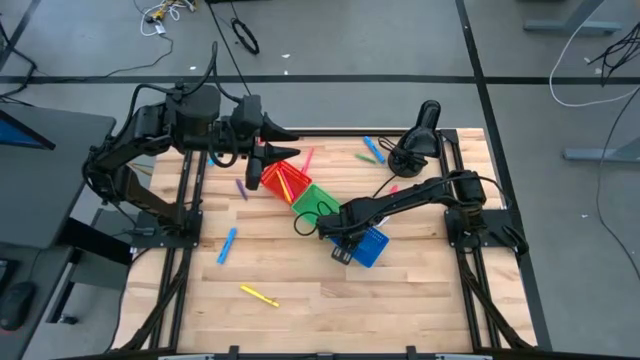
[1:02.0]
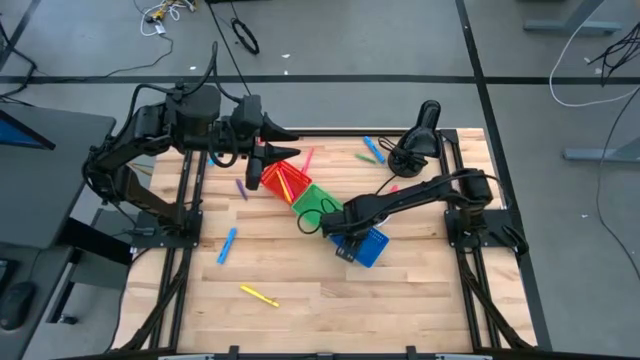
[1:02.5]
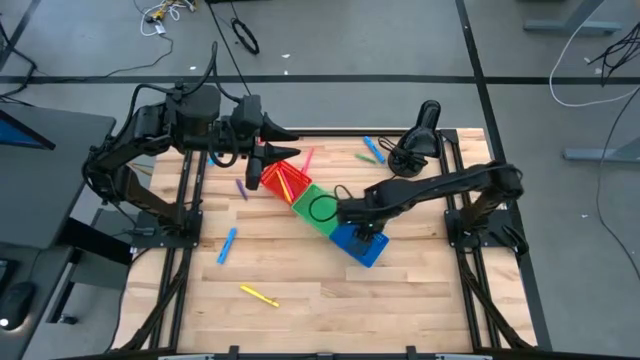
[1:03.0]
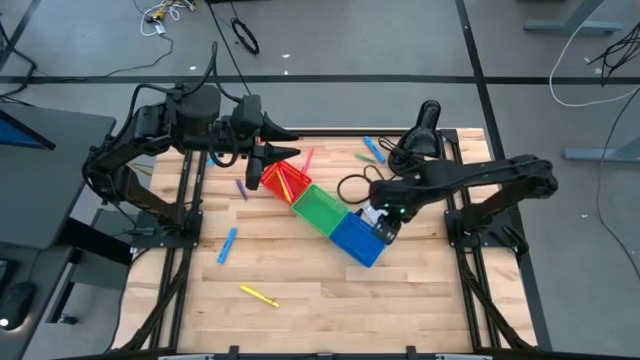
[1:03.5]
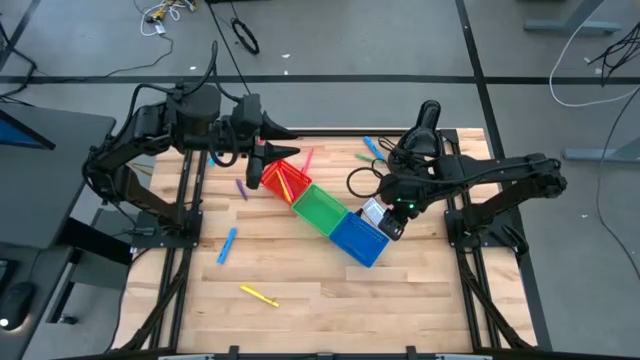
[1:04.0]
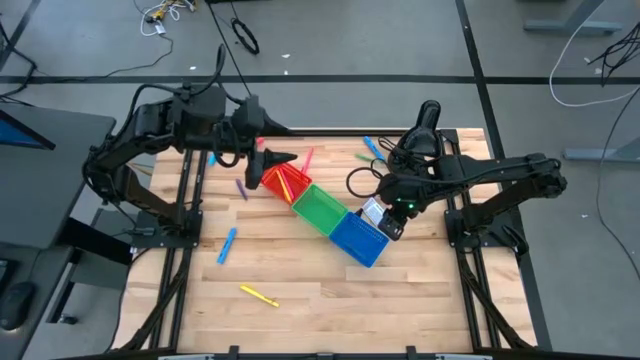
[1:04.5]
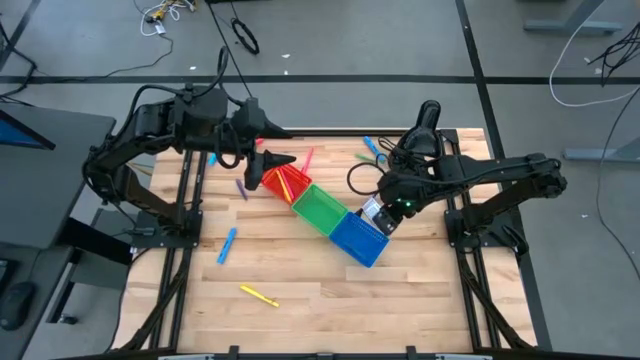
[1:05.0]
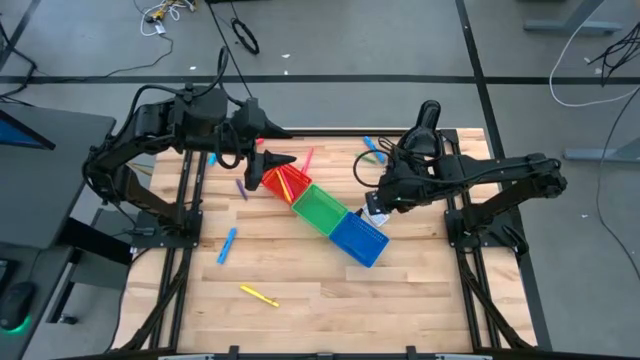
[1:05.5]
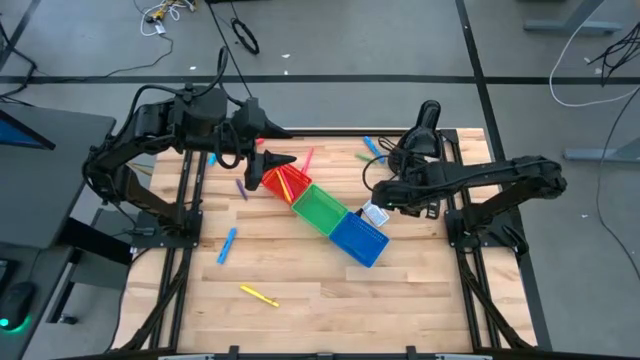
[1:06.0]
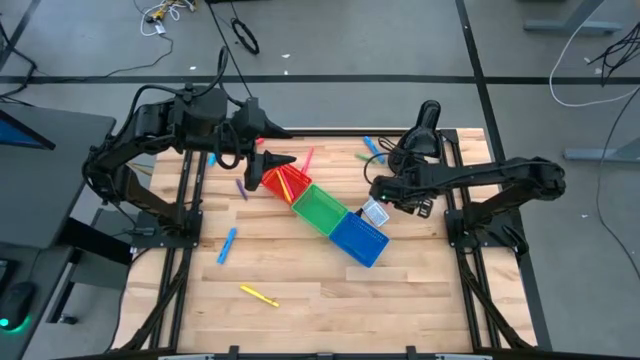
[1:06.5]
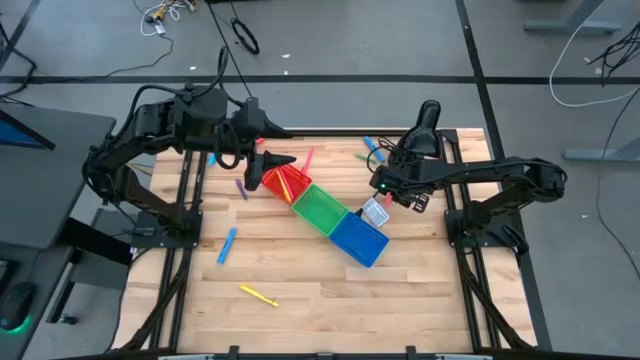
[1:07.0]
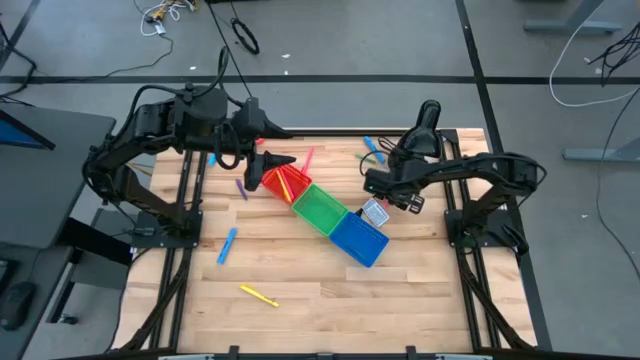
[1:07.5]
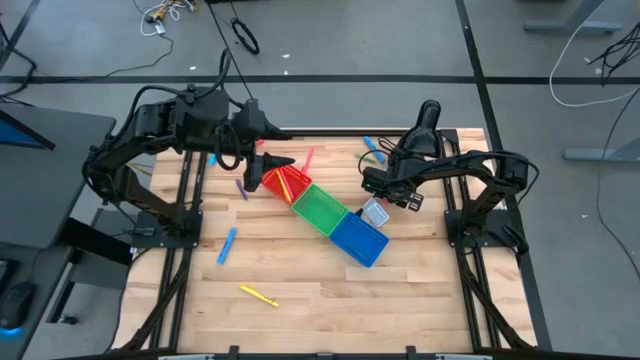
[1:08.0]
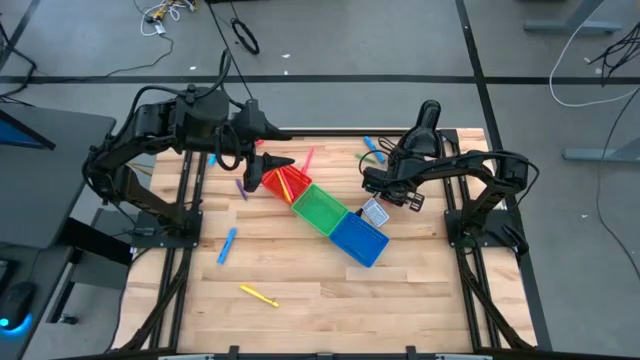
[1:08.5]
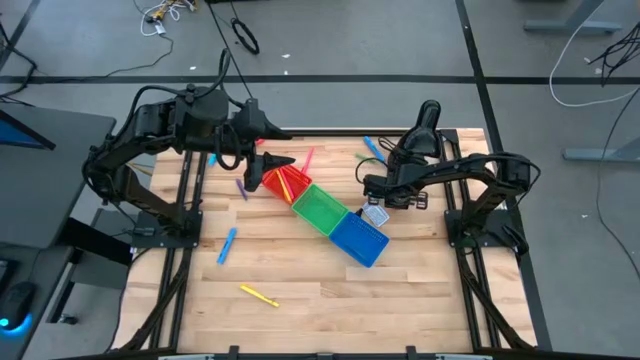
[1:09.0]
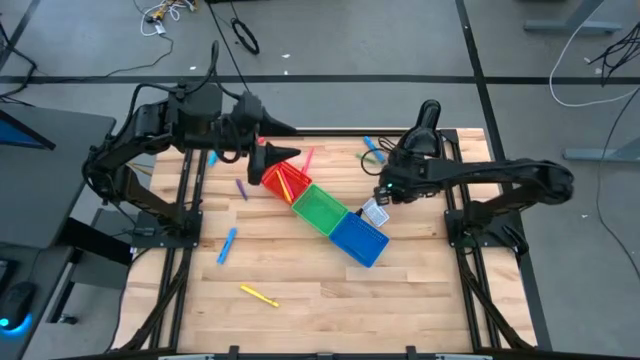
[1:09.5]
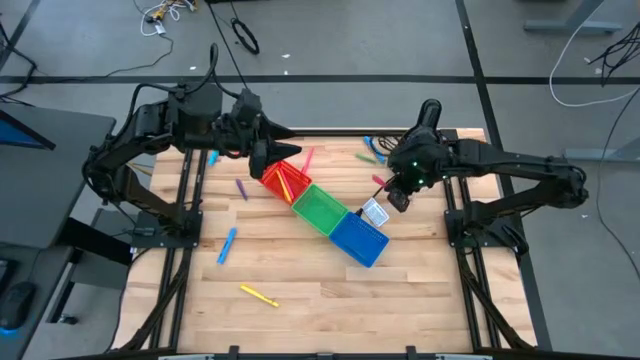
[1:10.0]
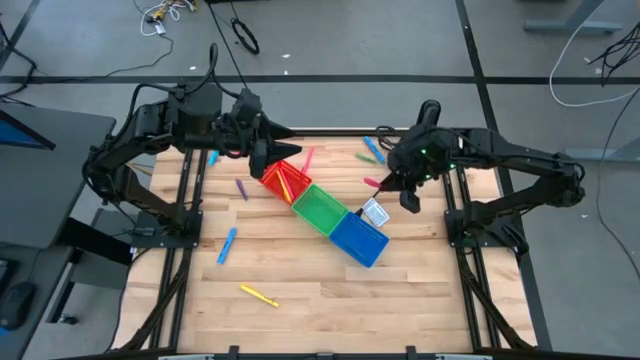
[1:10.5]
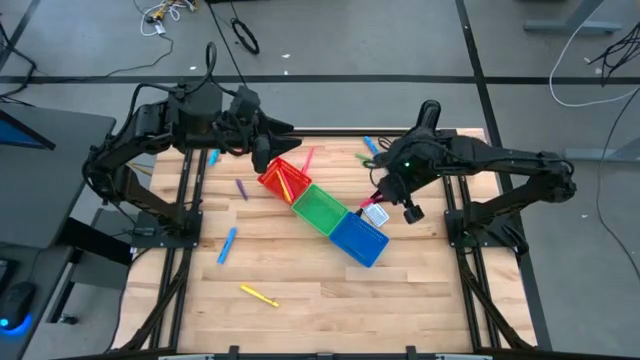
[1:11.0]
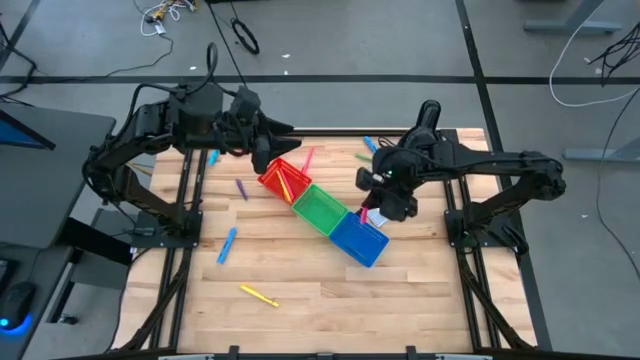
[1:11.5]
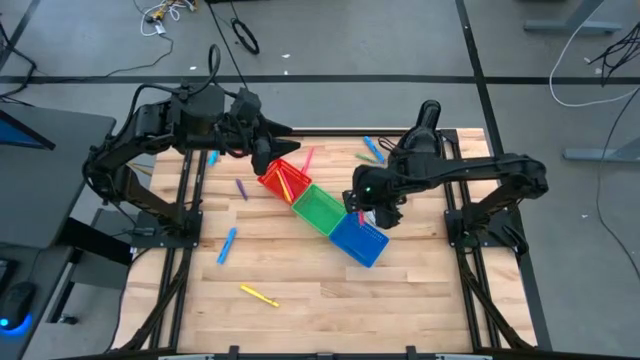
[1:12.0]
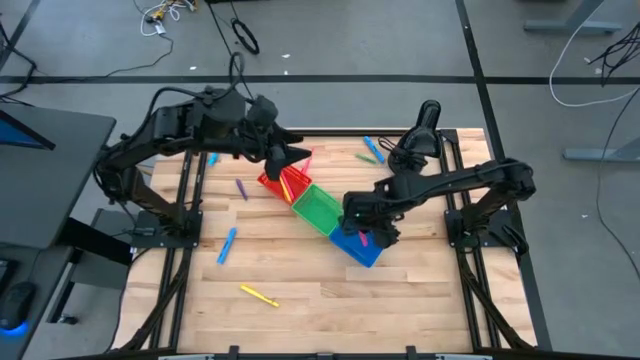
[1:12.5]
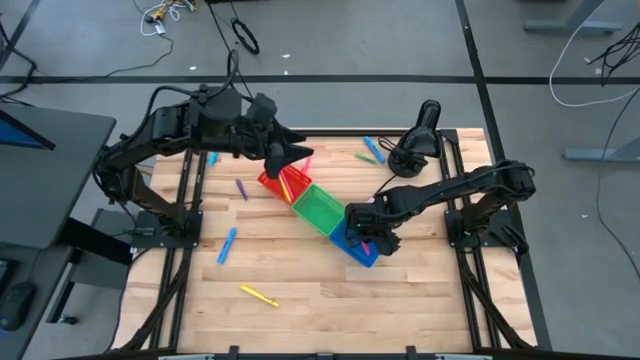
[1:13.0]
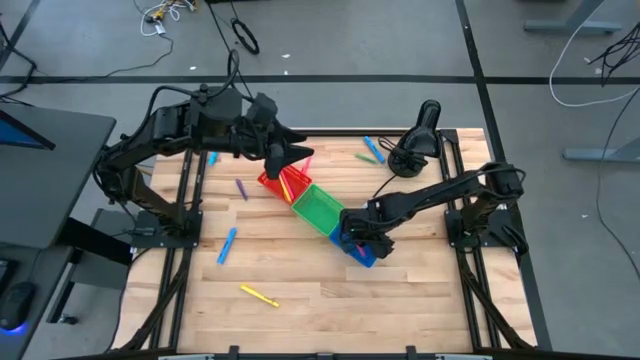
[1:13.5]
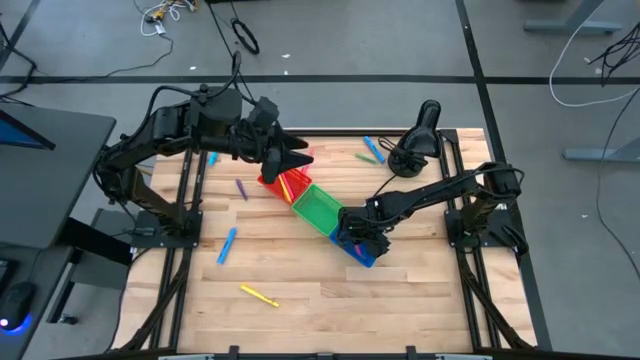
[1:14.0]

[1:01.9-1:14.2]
Task: Pick & Place Markers
Put the pink pen into the blue bin

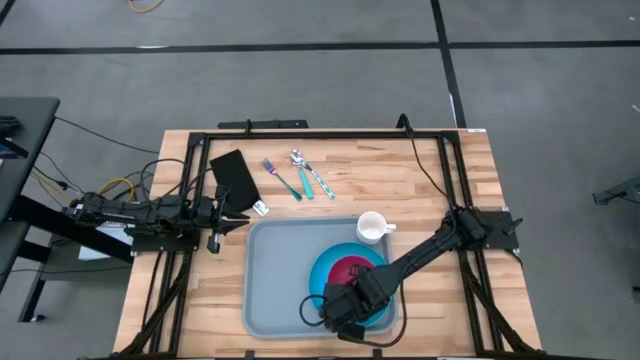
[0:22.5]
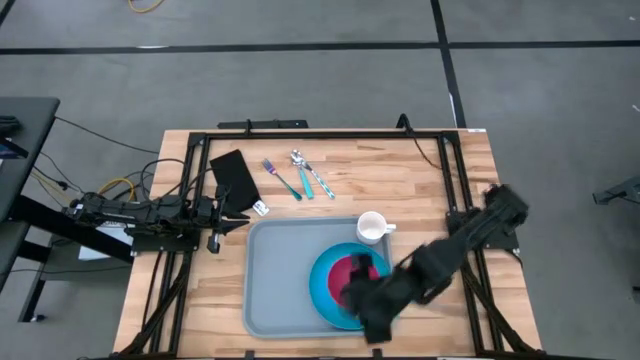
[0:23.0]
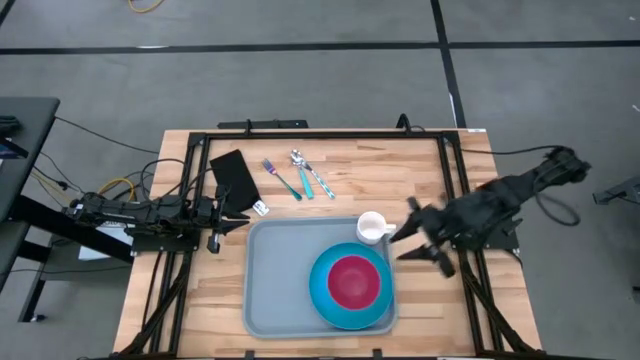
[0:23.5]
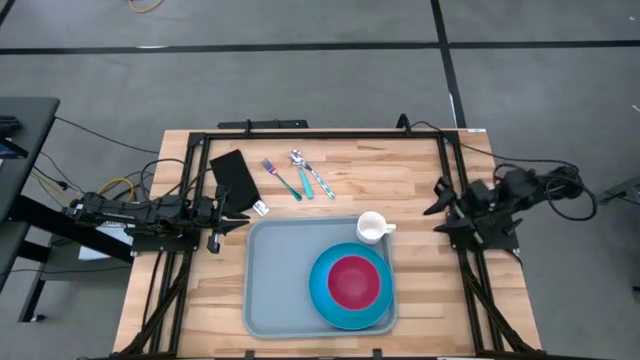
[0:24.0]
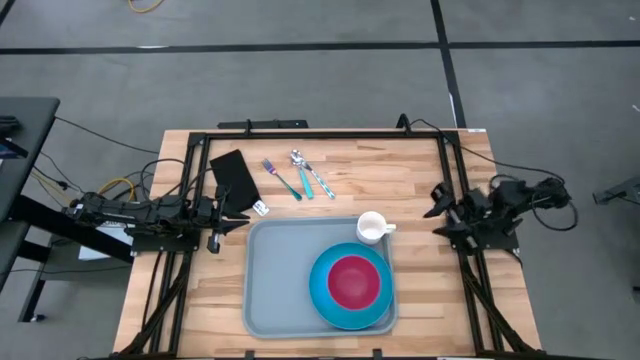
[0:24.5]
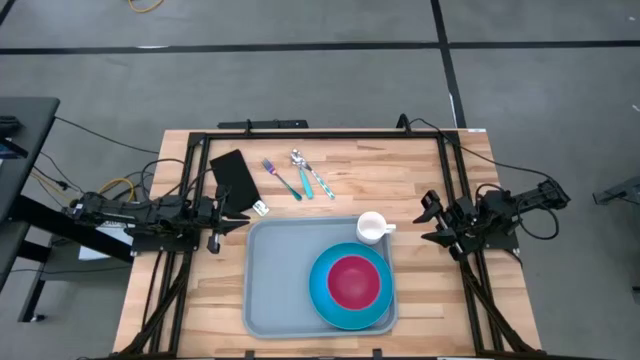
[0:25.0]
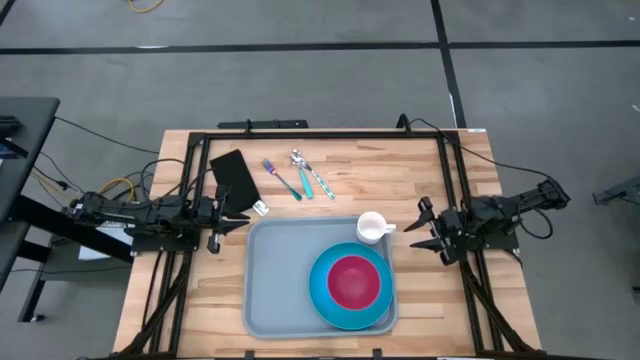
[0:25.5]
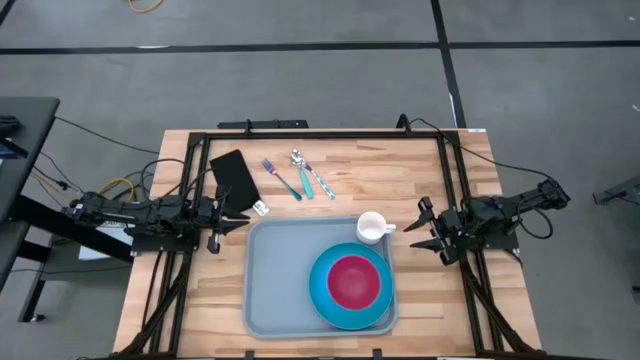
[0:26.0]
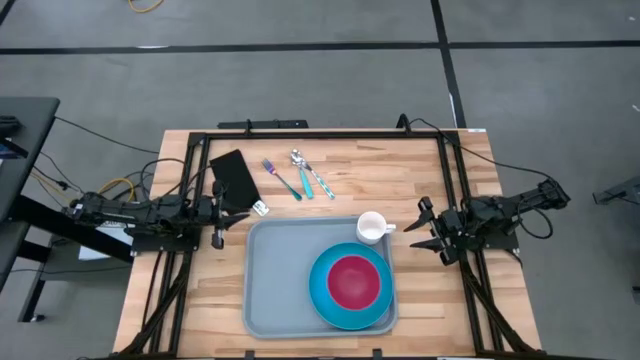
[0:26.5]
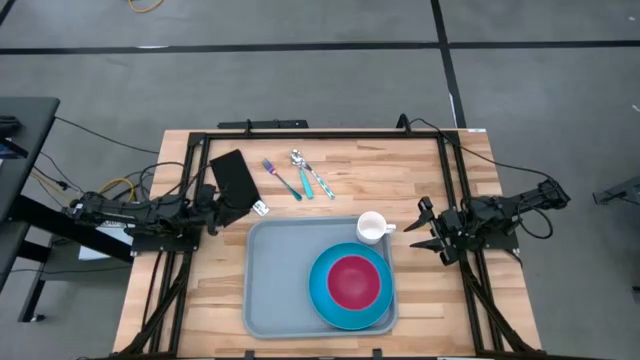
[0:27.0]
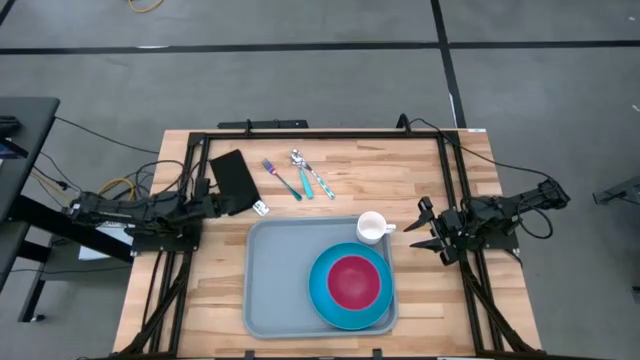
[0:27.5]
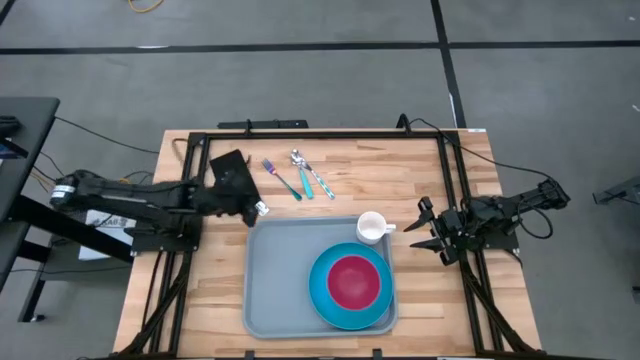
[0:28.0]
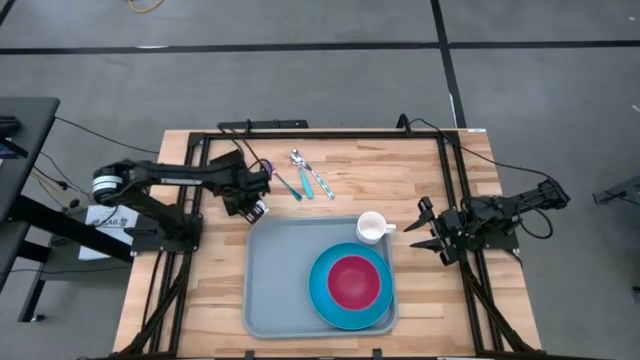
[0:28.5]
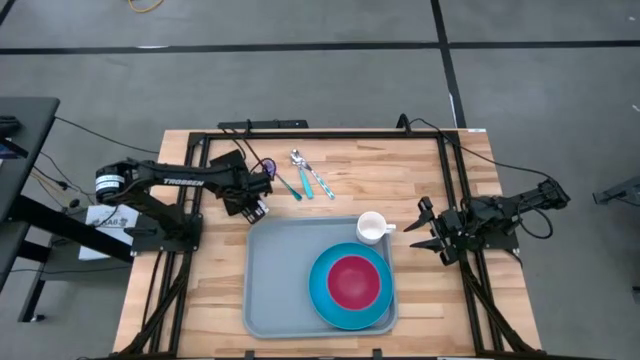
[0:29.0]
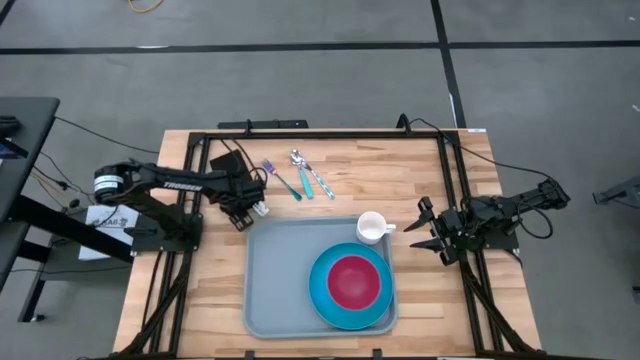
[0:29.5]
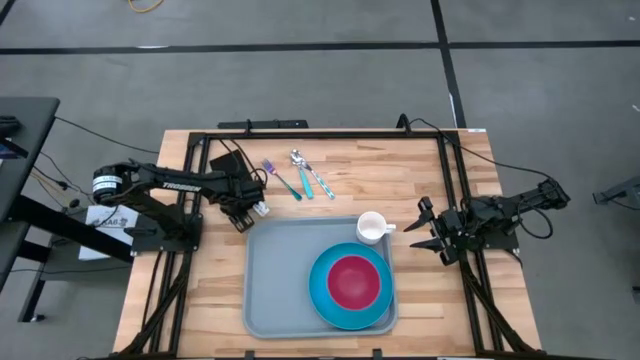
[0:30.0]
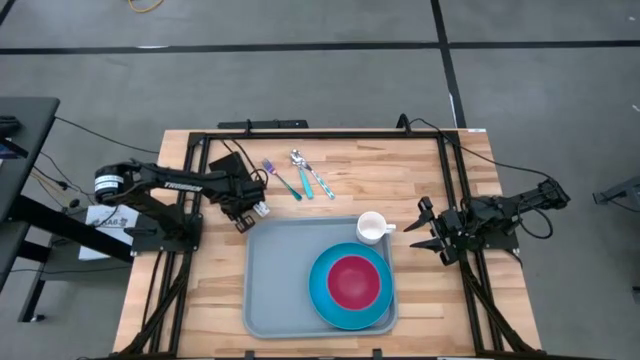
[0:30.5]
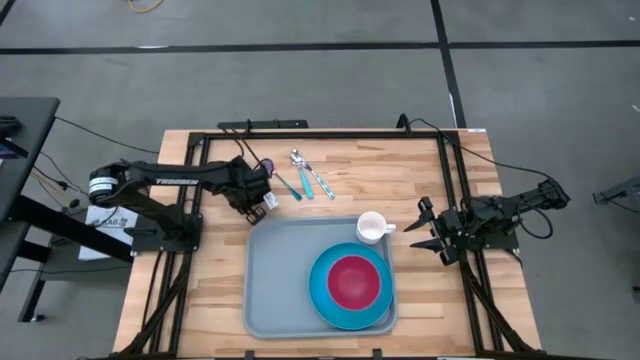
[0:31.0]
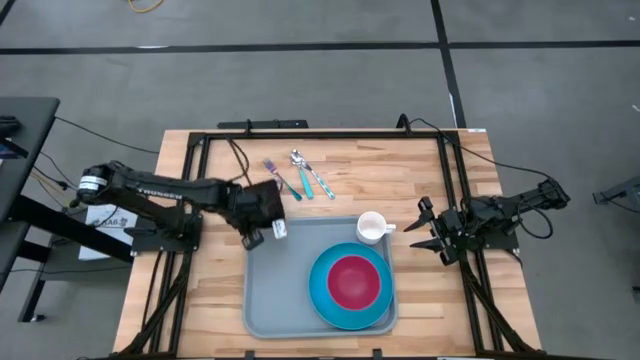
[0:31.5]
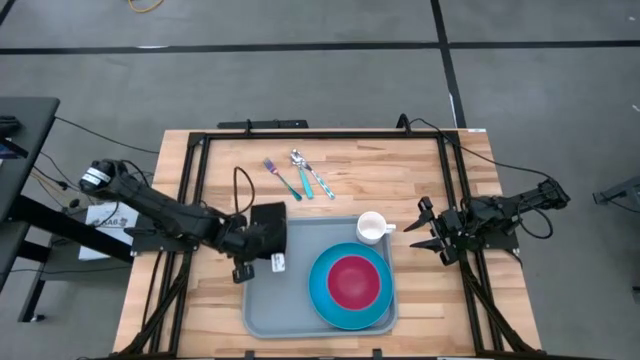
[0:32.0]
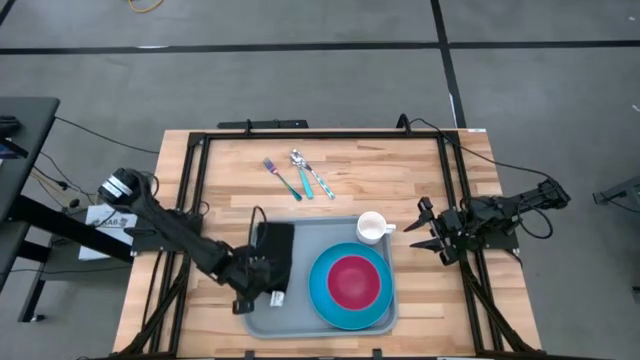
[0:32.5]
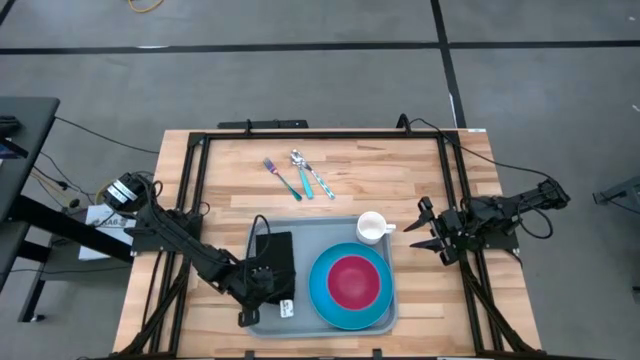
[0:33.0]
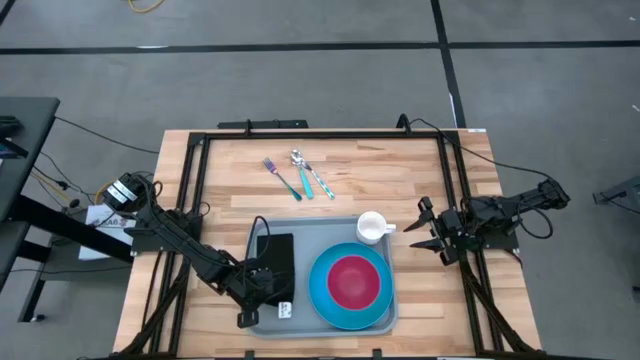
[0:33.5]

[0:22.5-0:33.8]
Task: Set up tray
Put the black table napkin on the gray serving tray to the left of the blue plate
